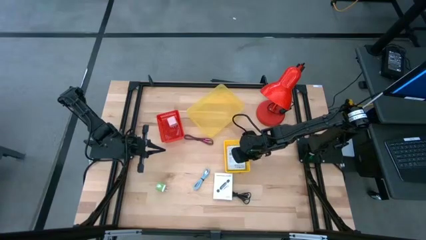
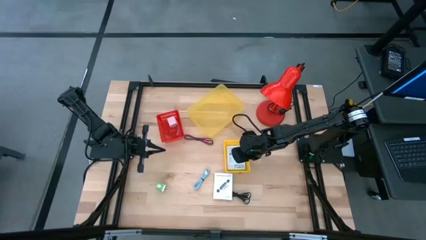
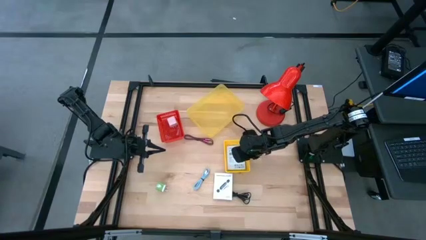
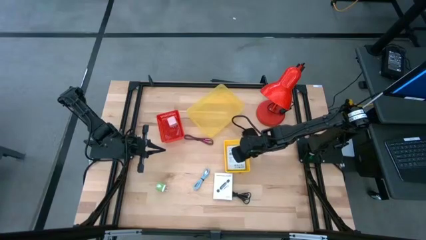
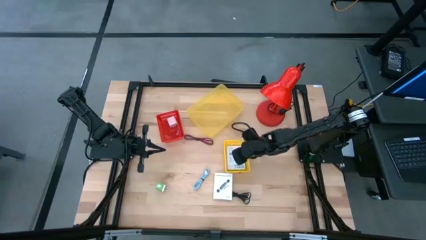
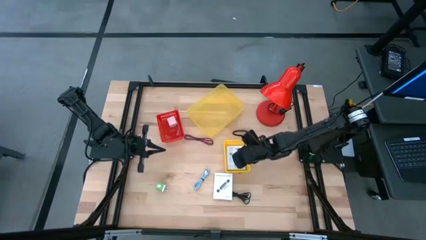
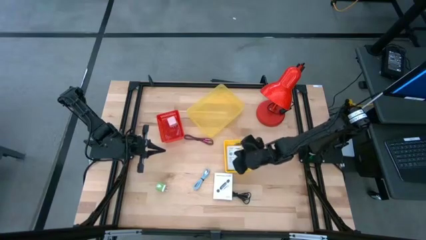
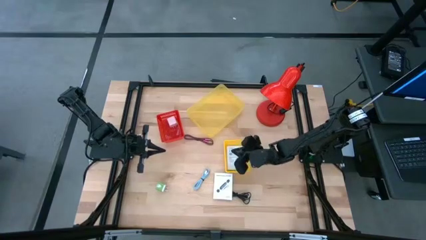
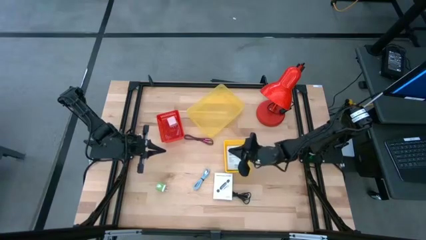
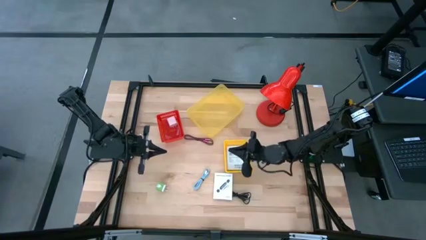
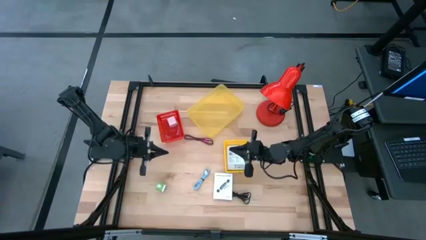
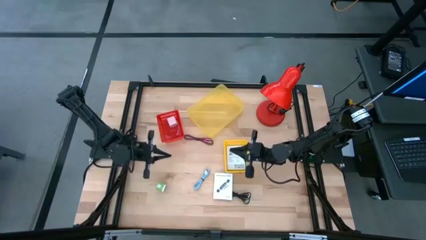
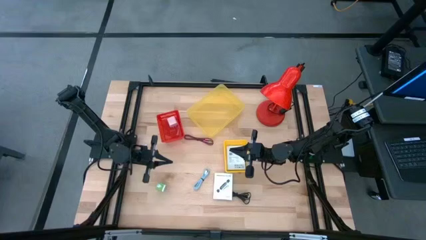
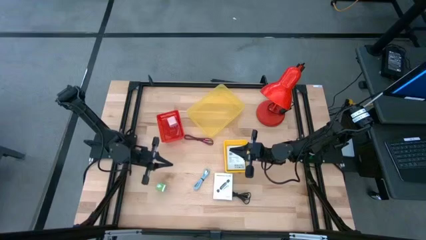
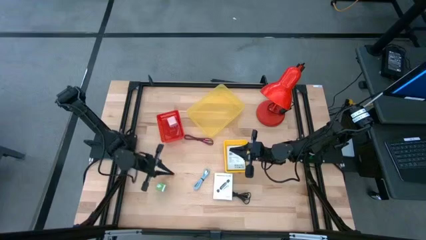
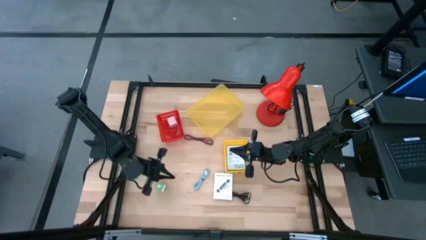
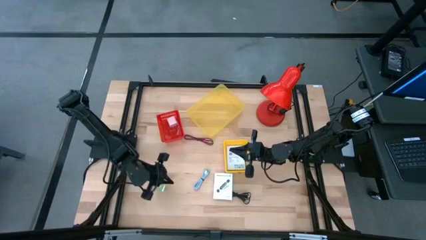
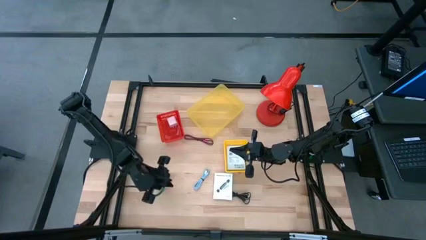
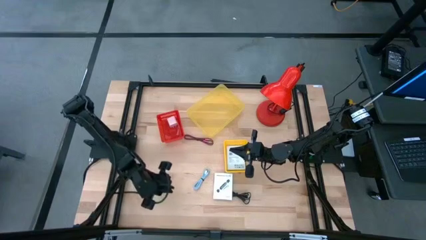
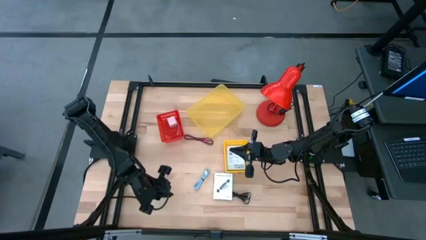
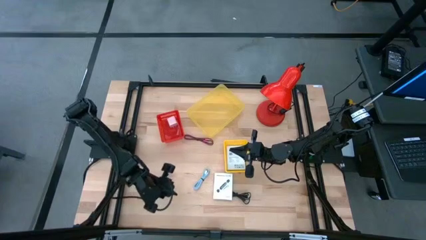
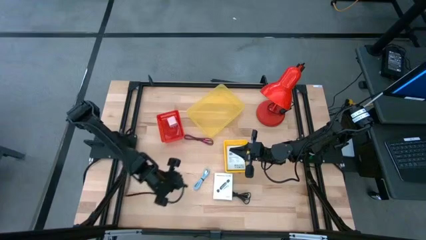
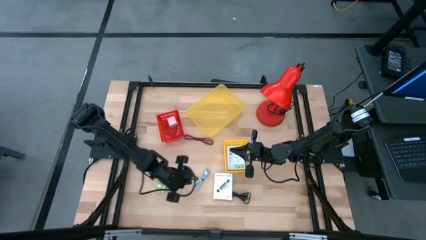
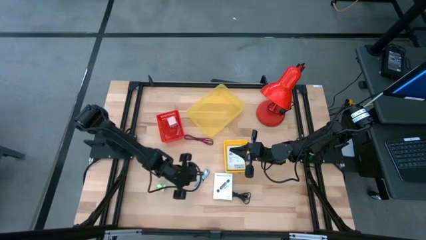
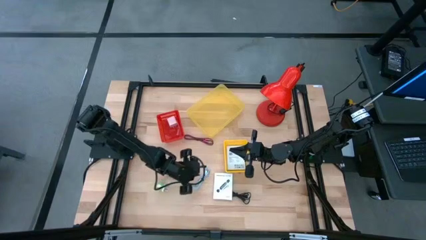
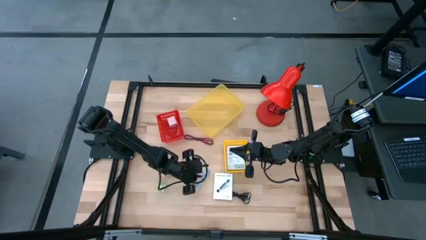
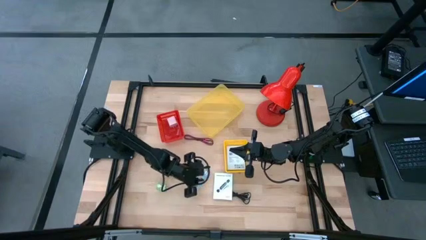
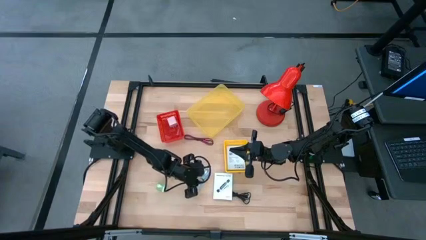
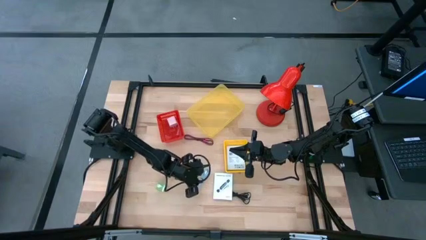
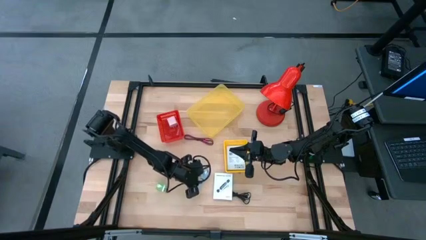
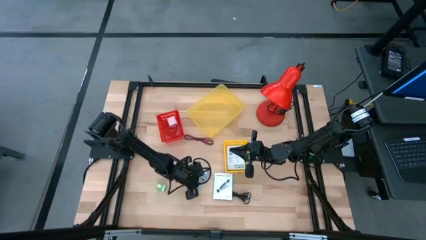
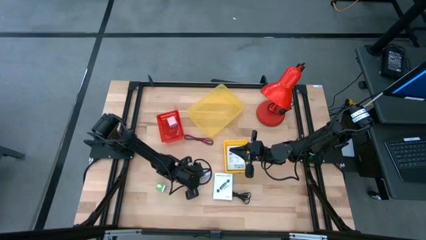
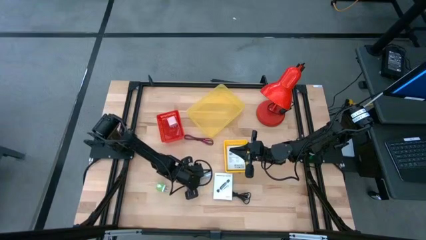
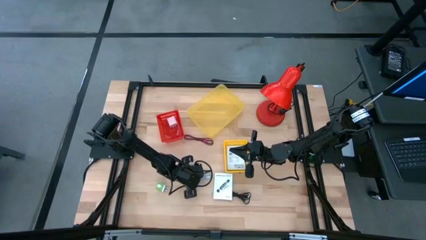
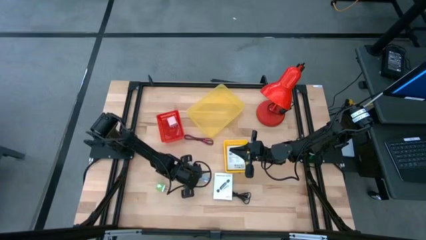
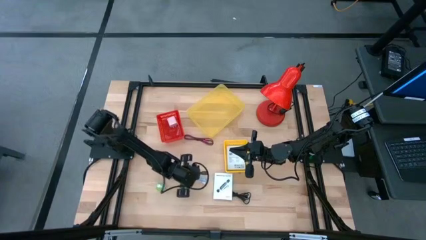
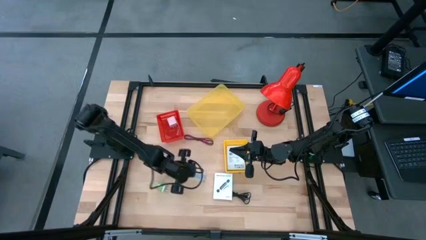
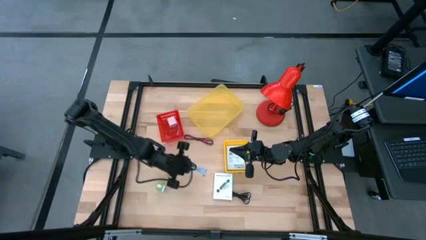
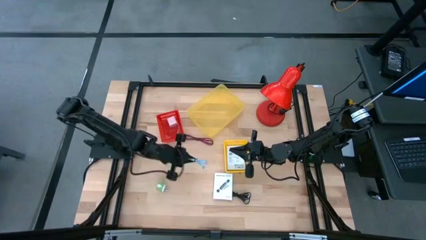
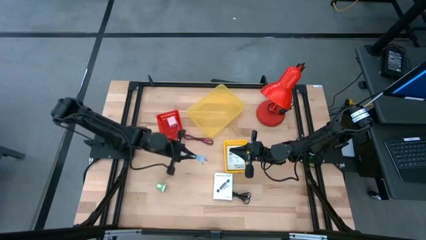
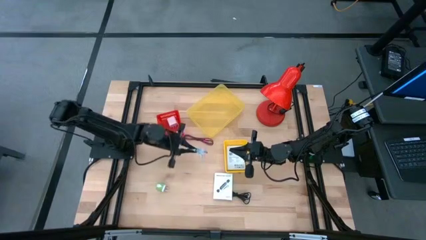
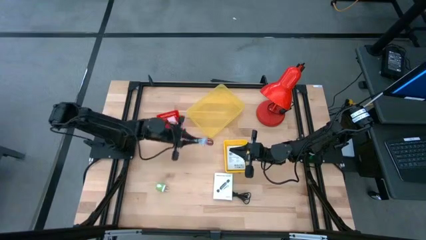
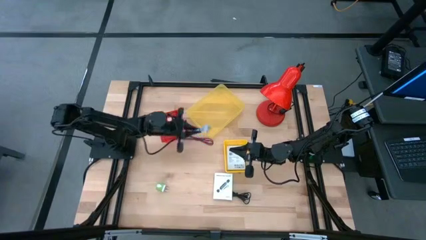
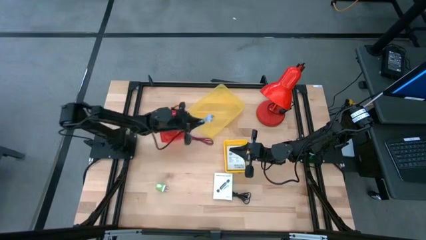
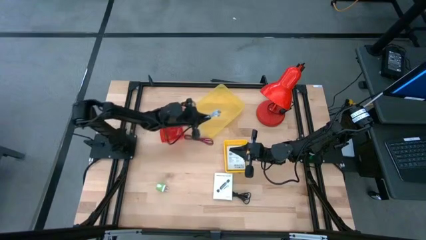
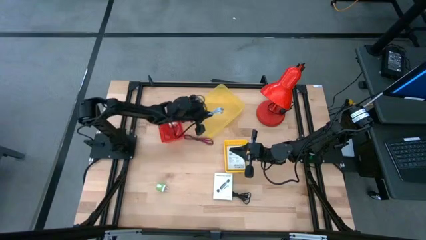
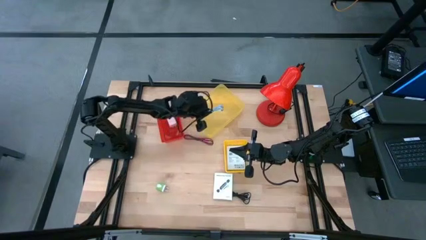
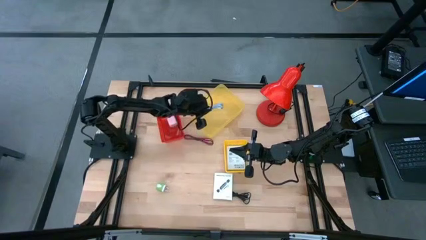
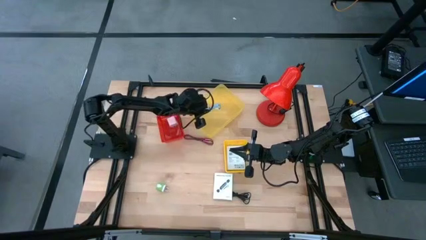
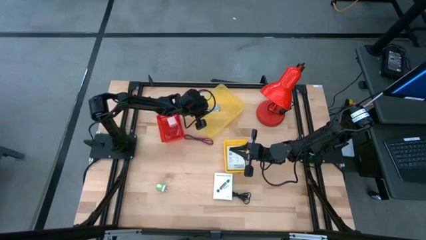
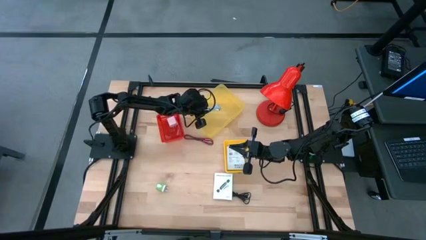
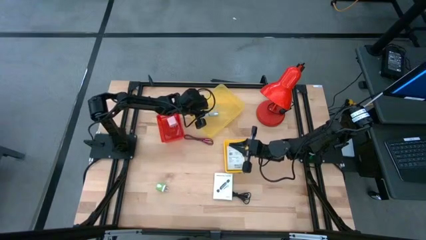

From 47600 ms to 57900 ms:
Task: Pick and place items into bin
Put the light blue charger cable into the big yellow bin

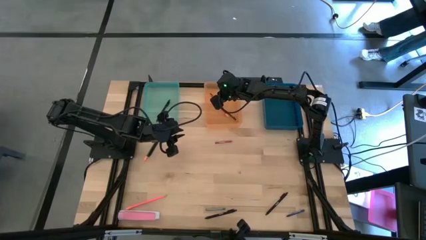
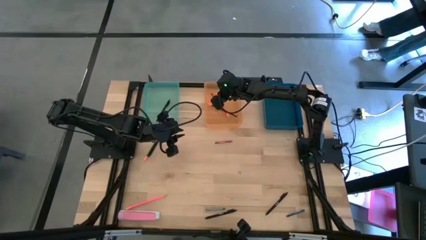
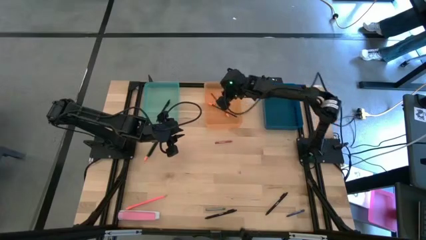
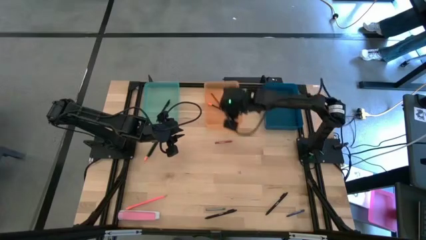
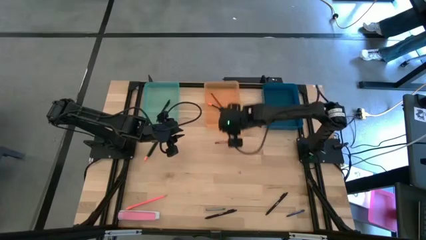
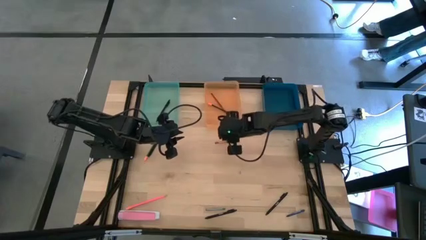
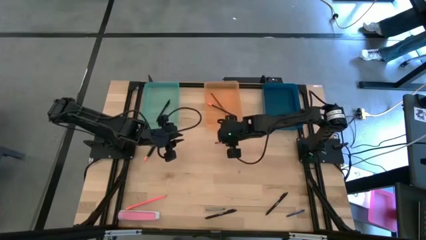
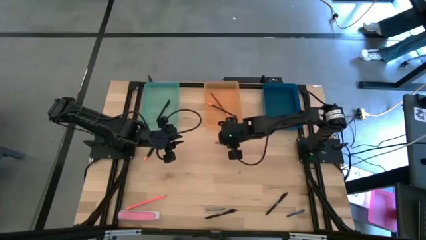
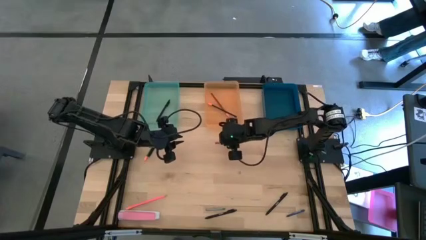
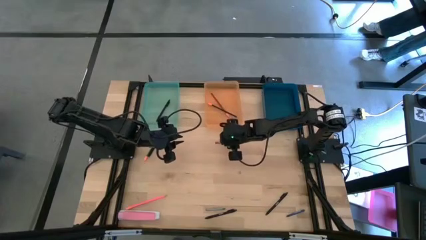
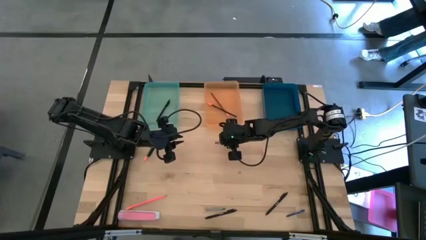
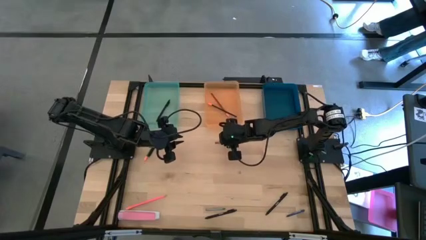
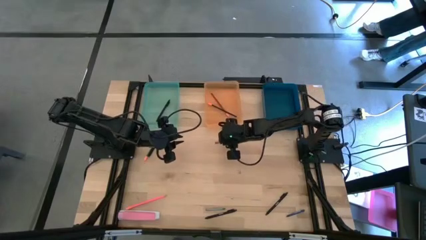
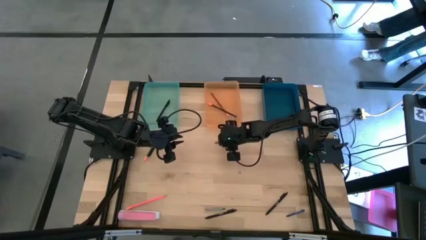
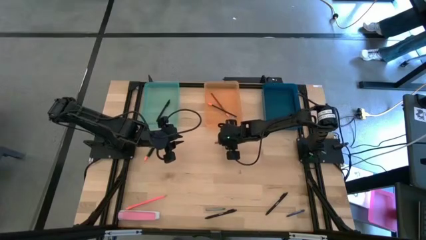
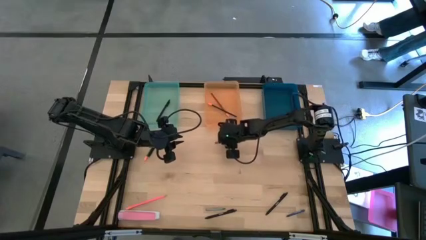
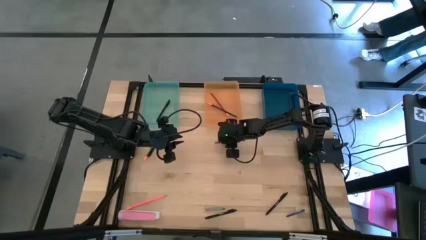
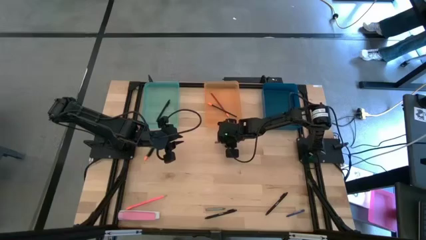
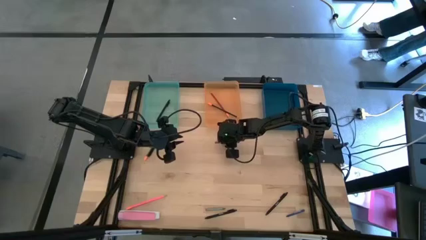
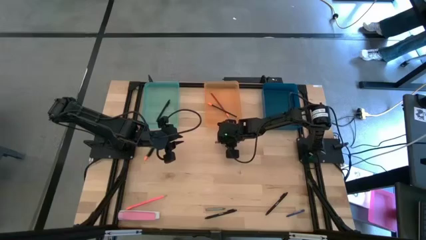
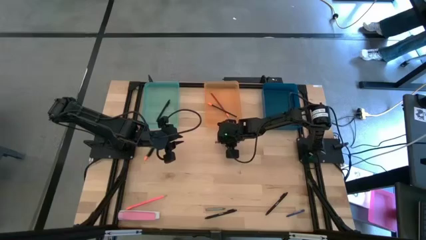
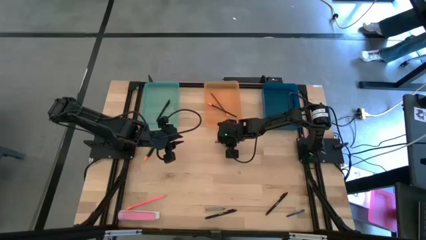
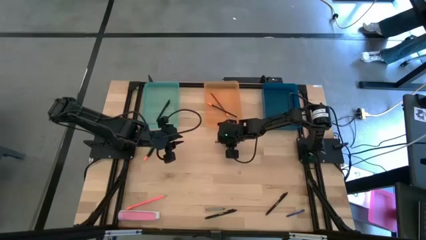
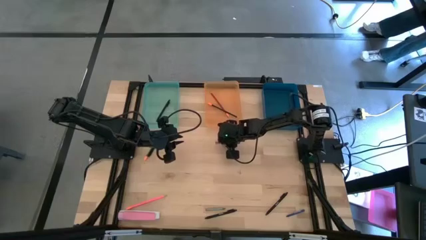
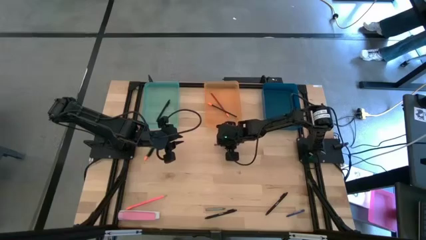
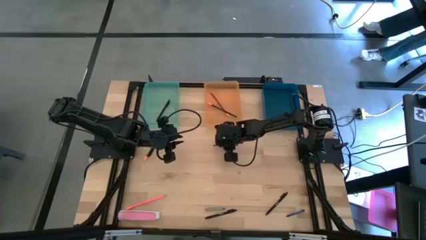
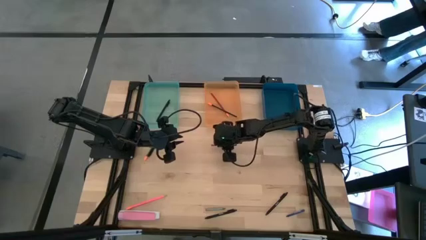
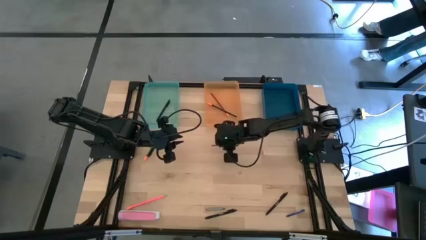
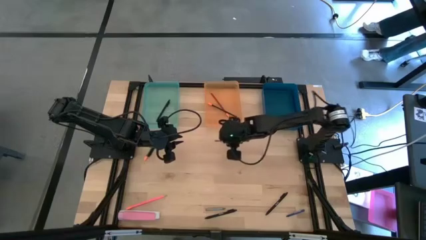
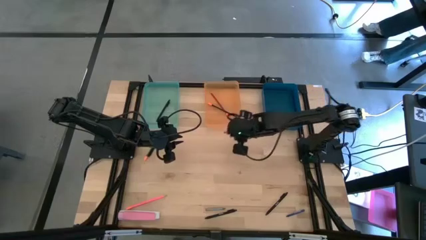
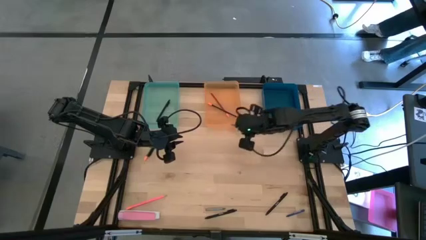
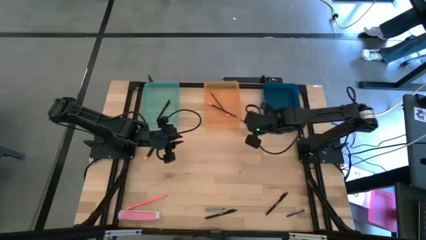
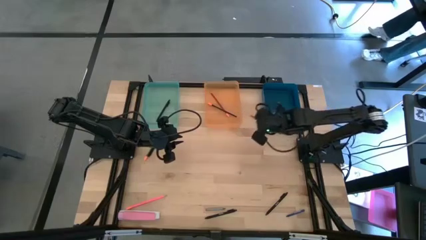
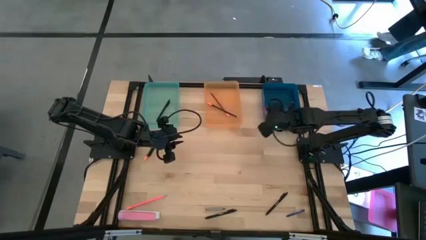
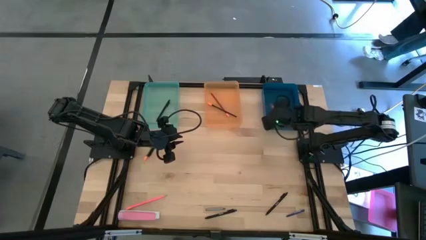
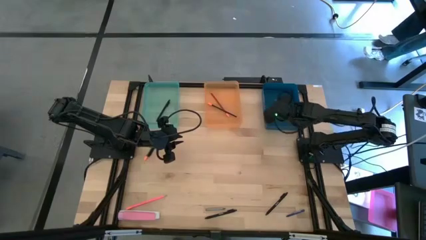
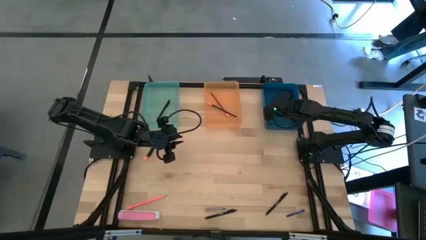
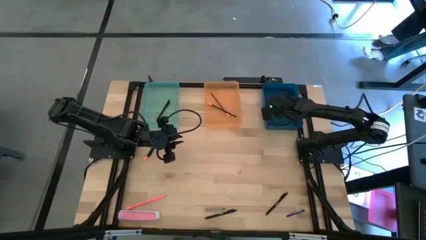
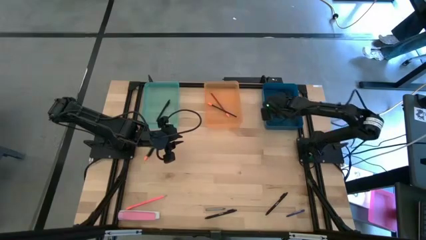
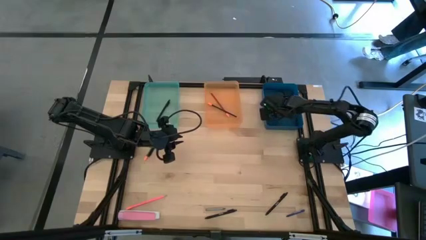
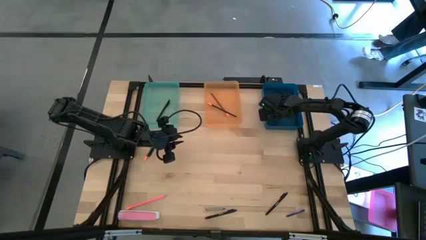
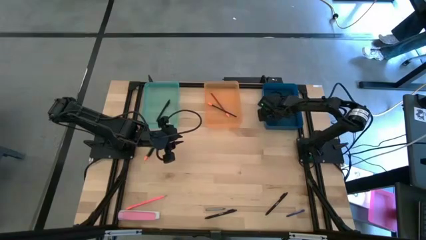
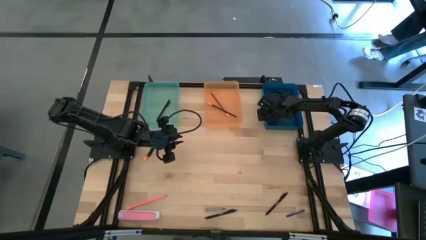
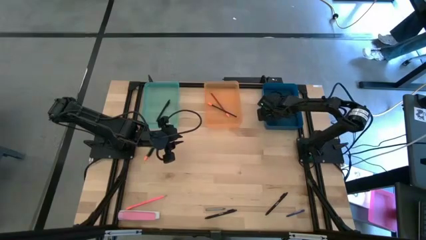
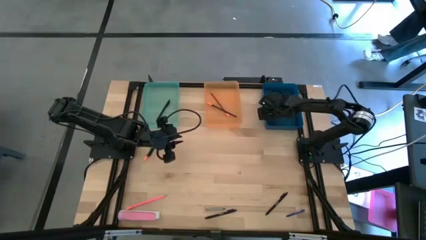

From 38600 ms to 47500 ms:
Task: Sort crayons/erasers/pens/pencils in bins
Put the red crayon into the blue bin
